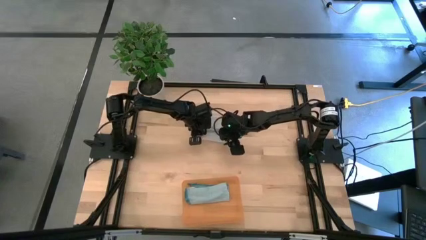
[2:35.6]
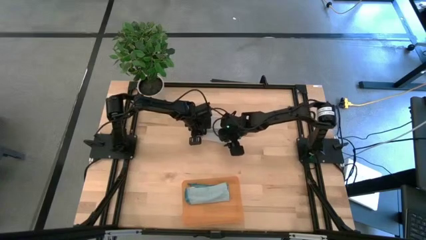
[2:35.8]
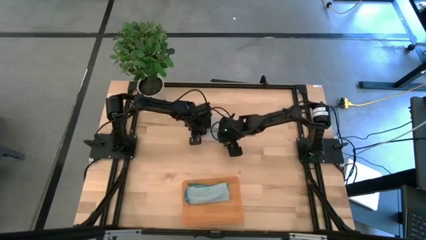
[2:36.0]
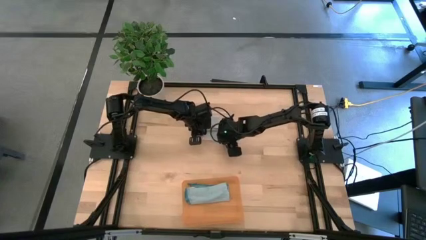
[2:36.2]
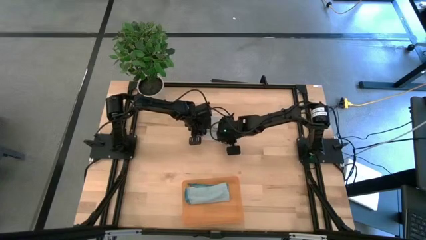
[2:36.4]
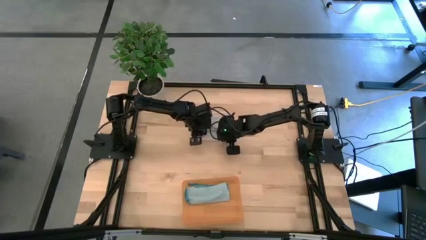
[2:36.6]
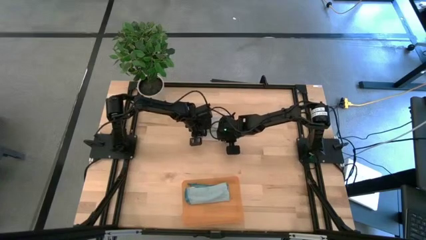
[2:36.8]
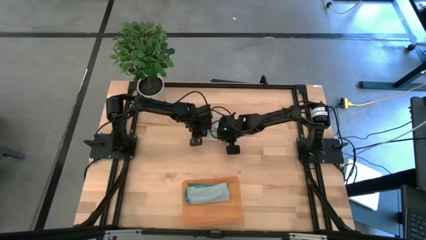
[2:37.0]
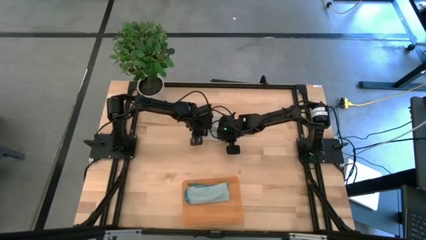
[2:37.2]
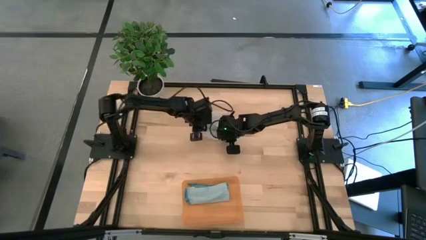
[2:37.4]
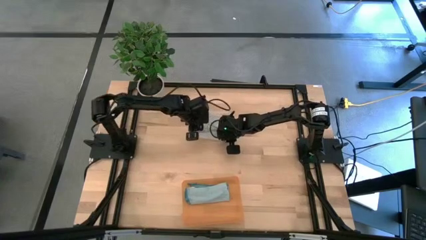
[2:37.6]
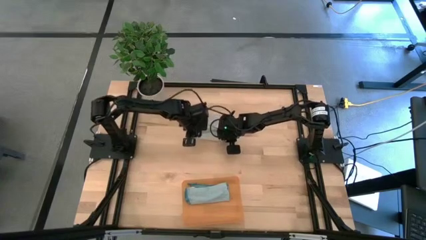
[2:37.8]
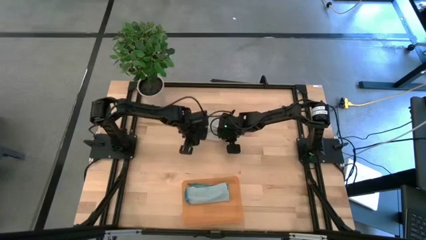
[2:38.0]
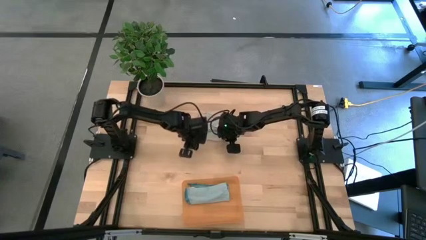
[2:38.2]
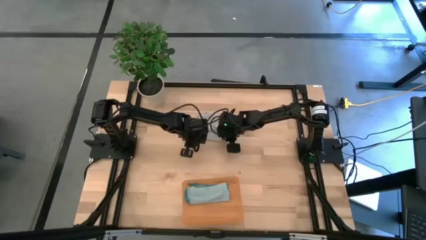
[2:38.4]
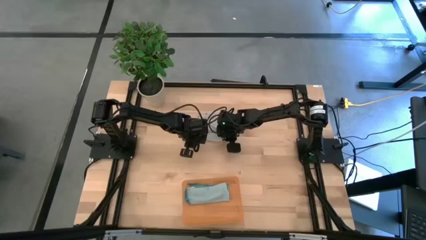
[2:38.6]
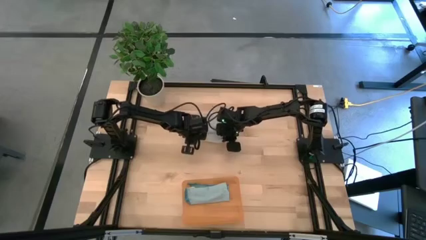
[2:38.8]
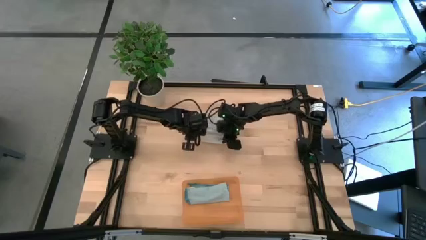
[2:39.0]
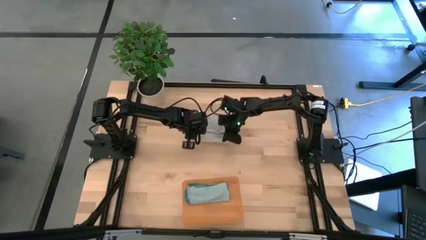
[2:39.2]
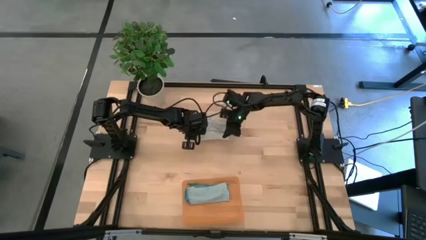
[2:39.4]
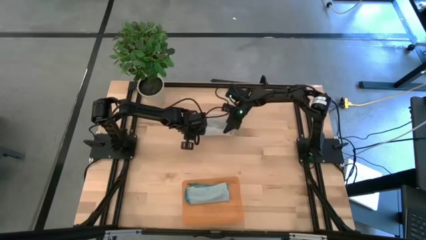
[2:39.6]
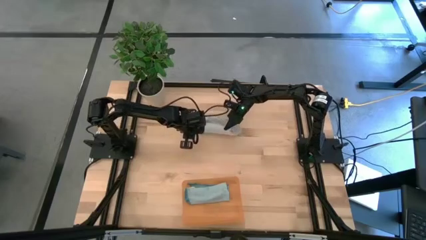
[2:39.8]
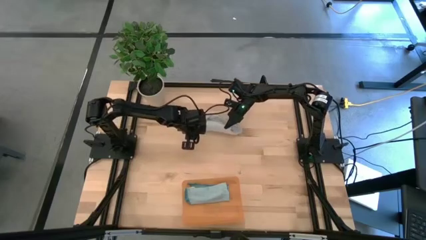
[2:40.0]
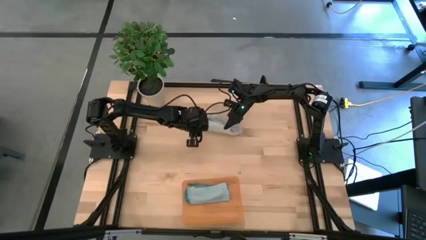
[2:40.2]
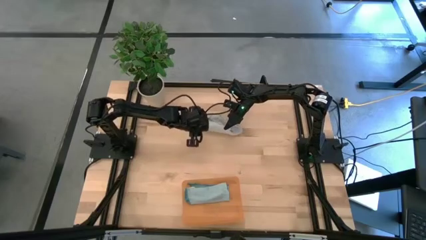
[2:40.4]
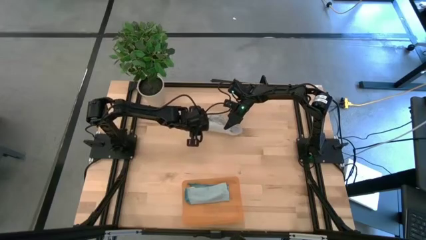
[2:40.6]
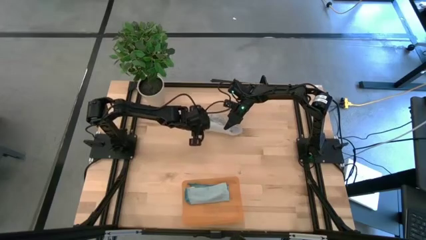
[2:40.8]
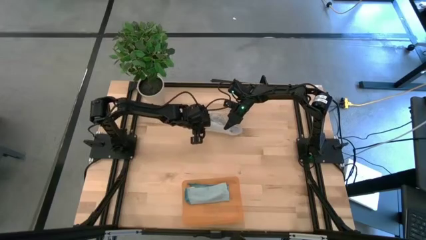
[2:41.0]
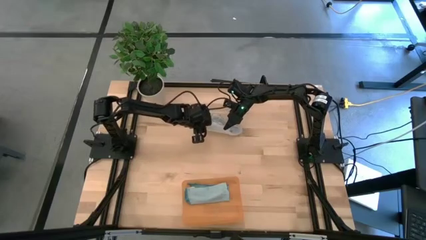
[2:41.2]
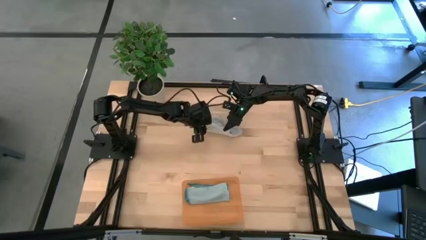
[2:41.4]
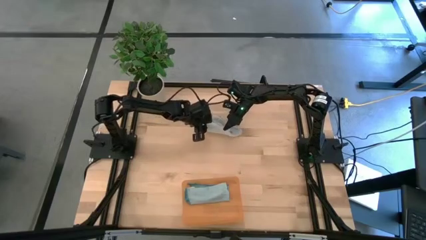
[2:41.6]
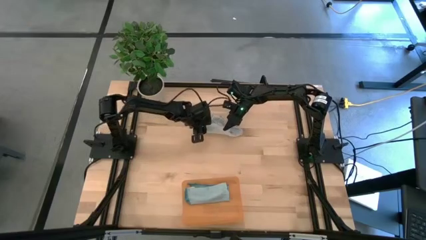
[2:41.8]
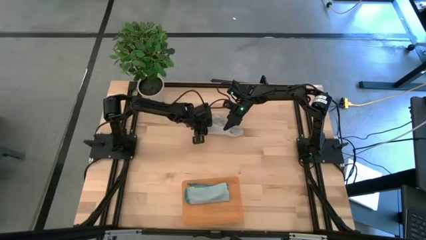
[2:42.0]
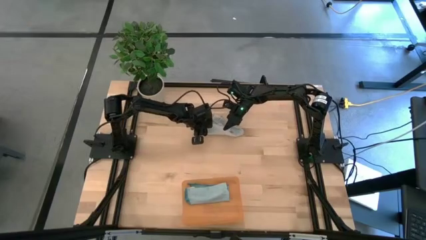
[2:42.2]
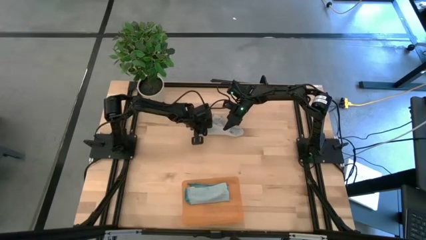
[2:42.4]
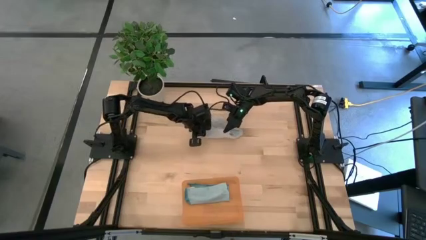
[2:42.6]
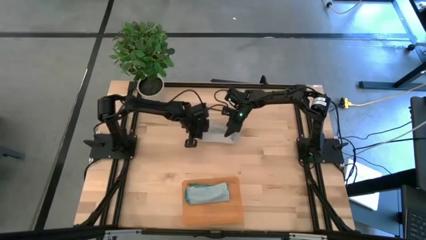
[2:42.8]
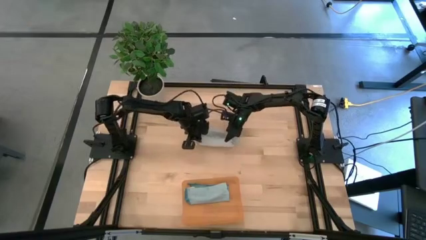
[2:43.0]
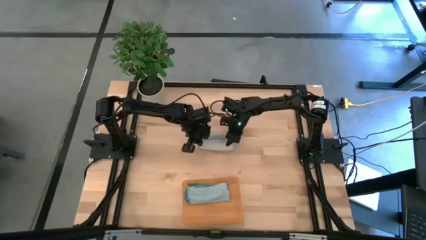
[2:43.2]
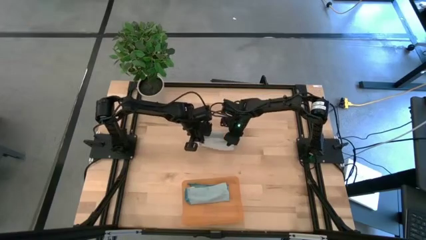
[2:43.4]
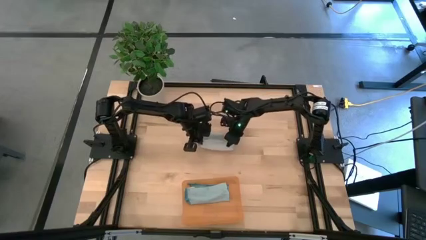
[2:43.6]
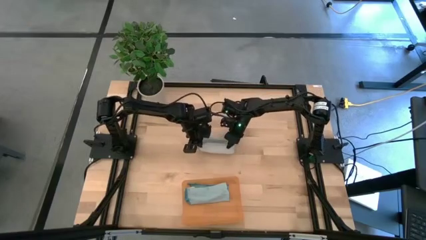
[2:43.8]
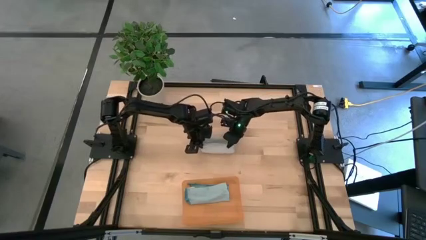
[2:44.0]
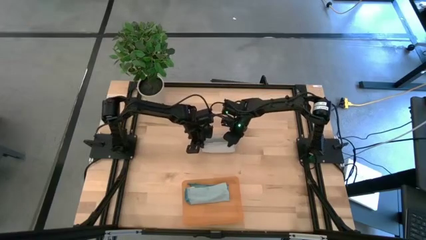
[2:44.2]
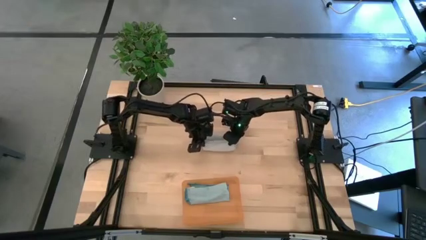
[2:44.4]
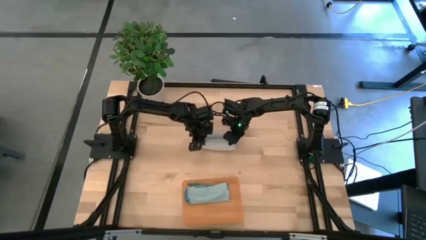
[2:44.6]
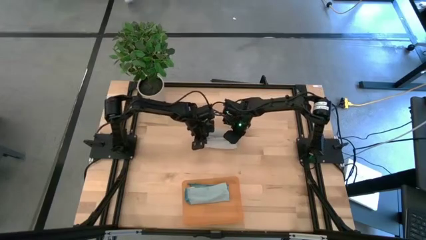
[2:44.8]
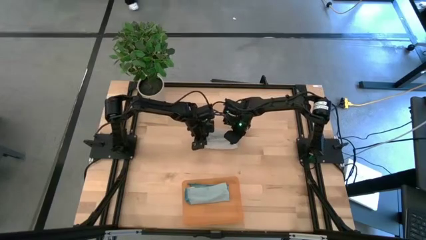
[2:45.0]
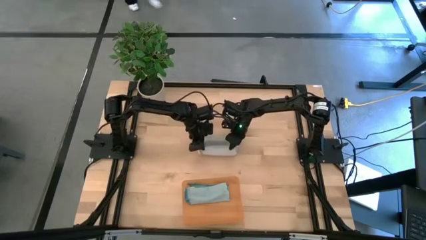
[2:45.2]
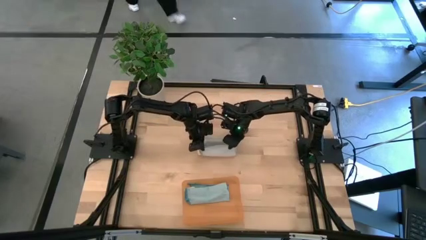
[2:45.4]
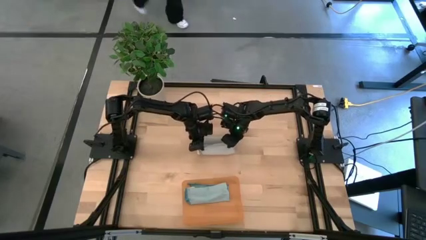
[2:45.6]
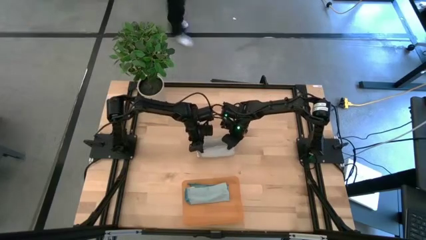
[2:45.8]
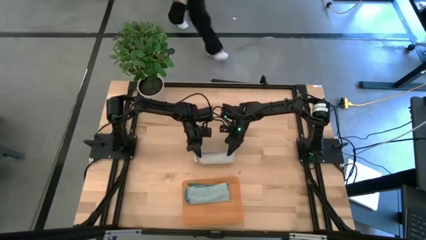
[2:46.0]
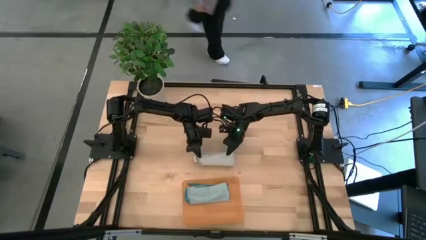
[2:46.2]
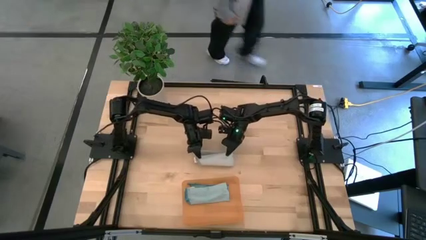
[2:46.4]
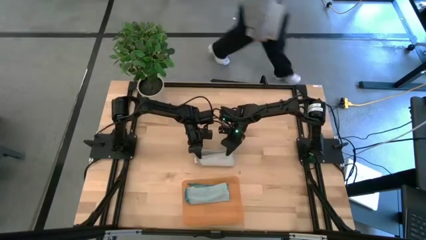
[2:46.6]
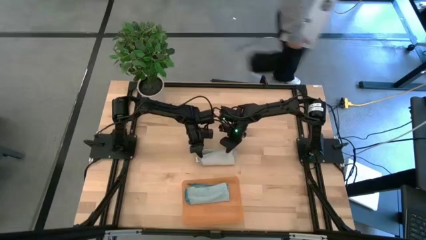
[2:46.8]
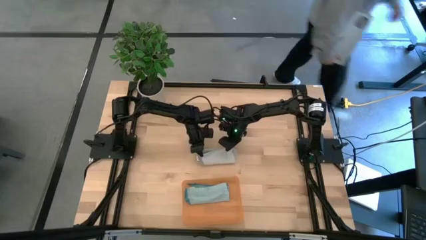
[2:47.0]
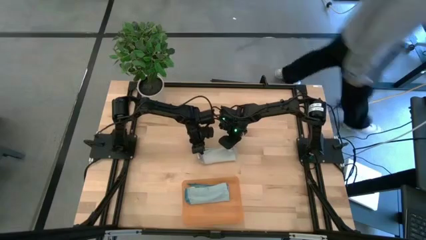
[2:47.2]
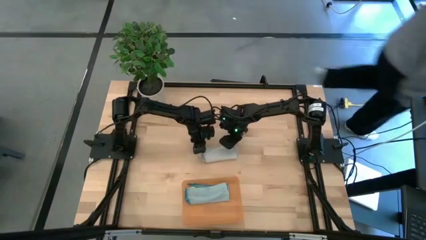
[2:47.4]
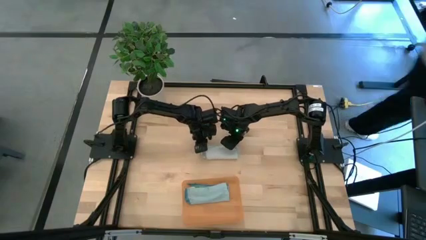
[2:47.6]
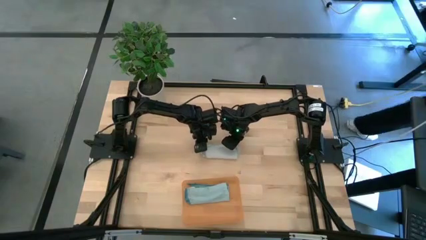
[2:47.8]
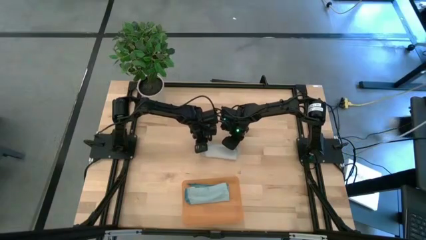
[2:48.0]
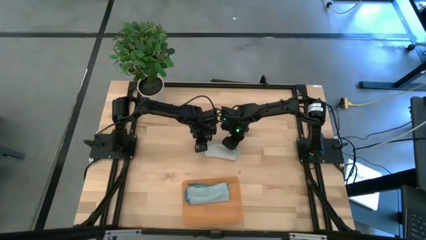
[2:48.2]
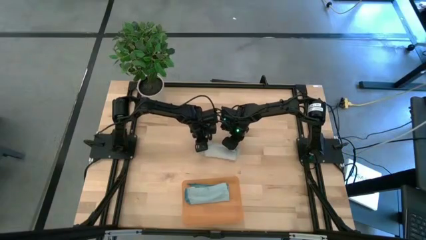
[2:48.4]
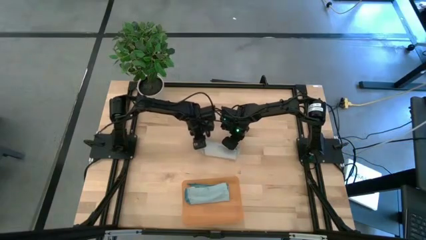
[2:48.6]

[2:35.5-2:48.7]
Task: Roll microfiber towels into tight, uniform cylinder then place into a basket
Roll the gray towel
